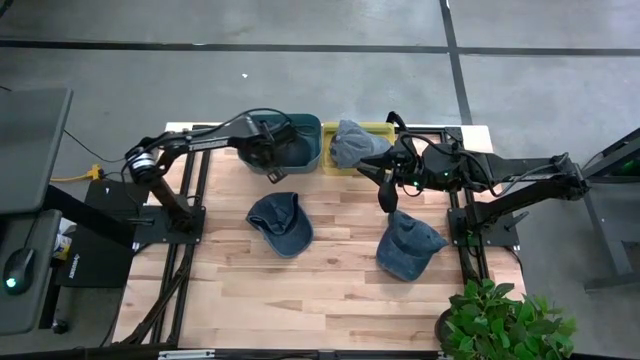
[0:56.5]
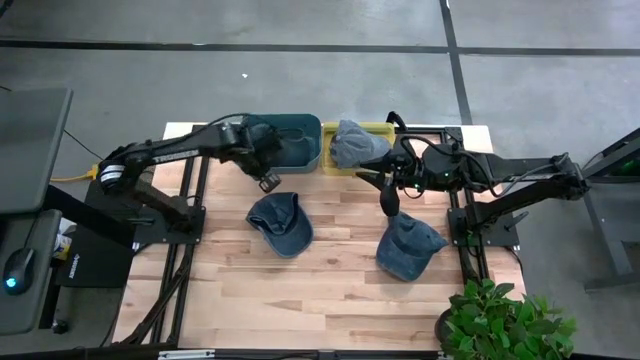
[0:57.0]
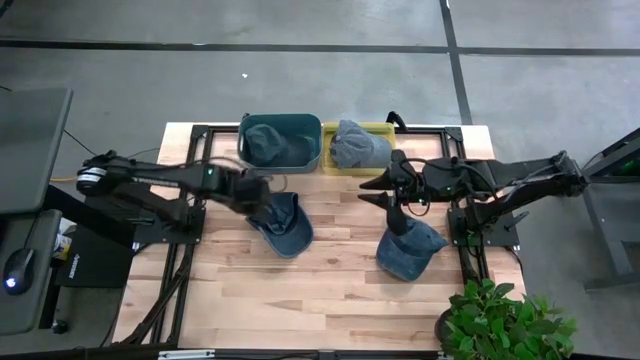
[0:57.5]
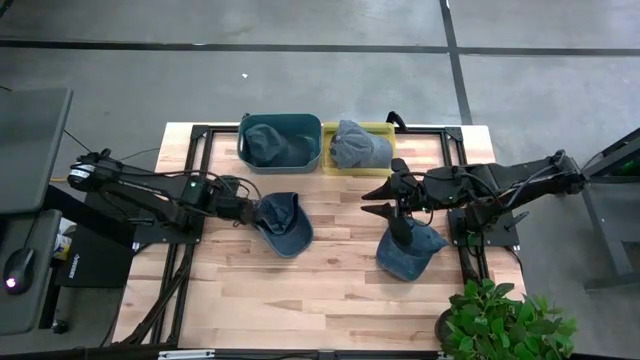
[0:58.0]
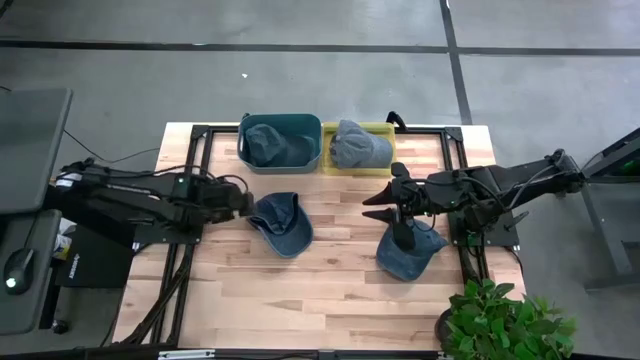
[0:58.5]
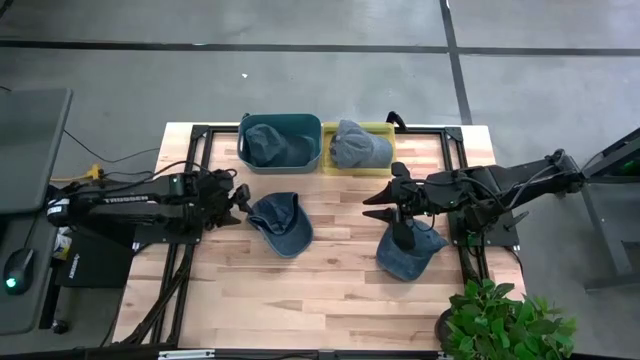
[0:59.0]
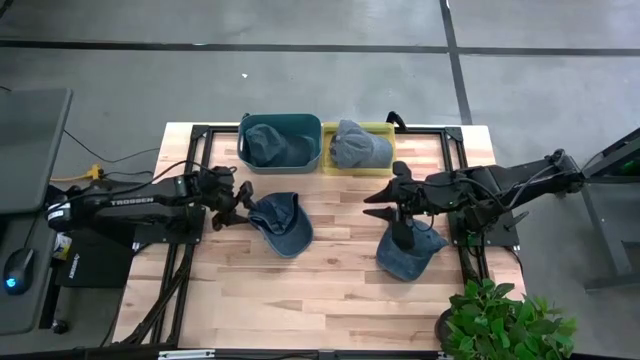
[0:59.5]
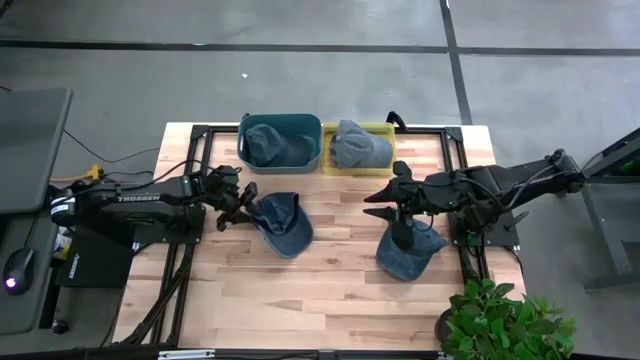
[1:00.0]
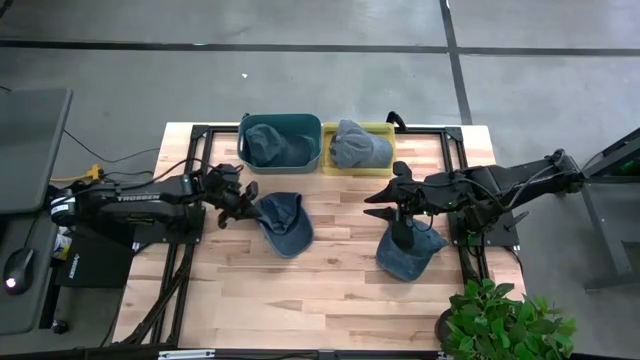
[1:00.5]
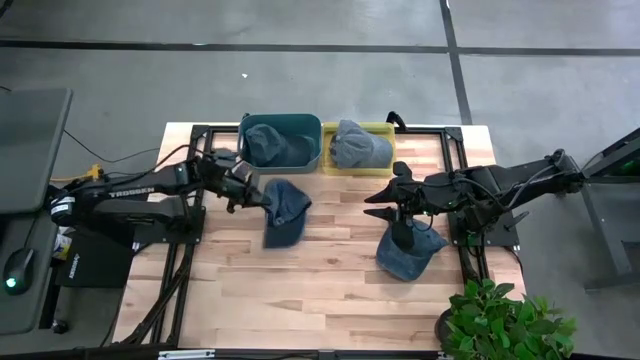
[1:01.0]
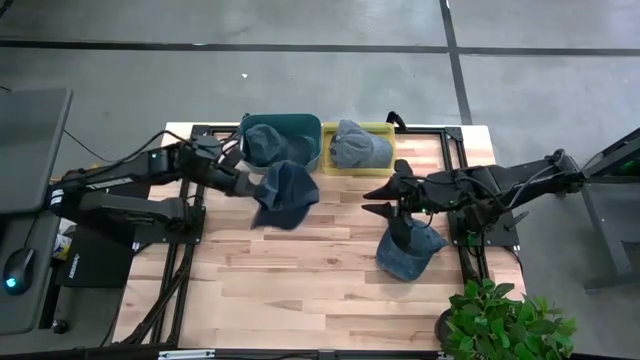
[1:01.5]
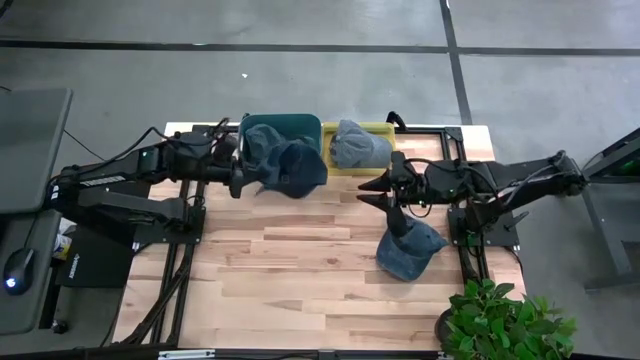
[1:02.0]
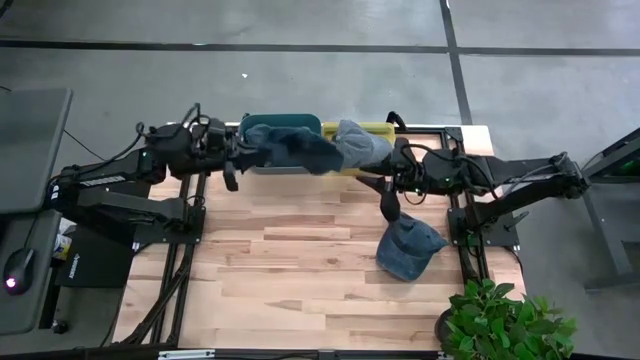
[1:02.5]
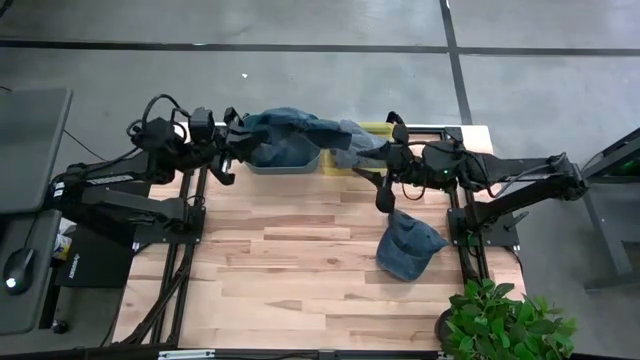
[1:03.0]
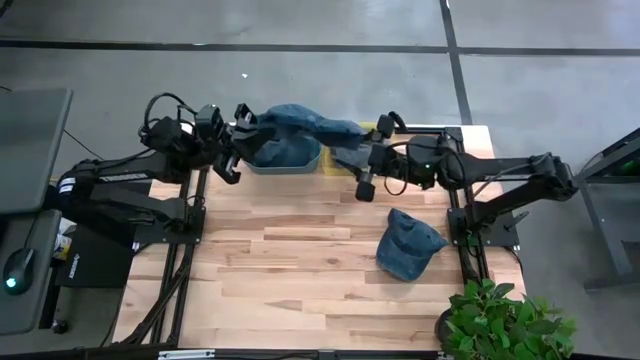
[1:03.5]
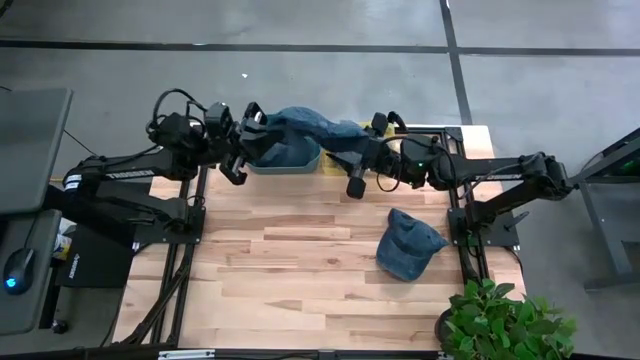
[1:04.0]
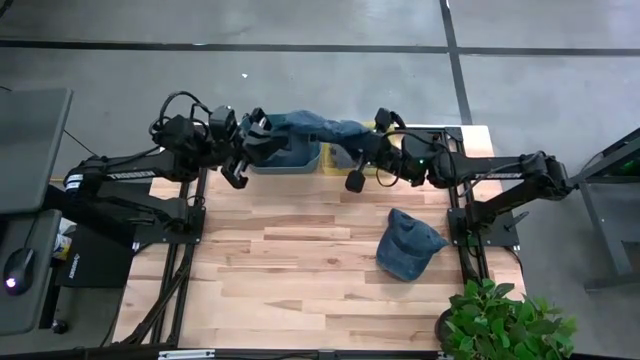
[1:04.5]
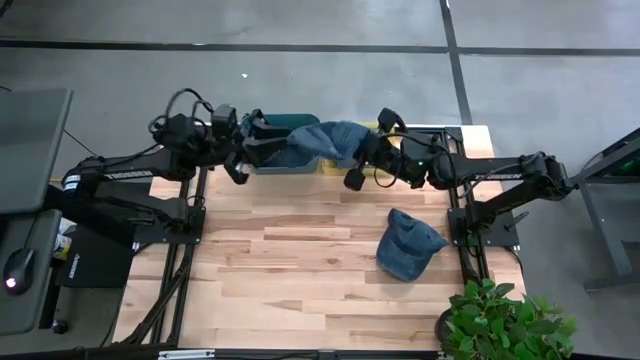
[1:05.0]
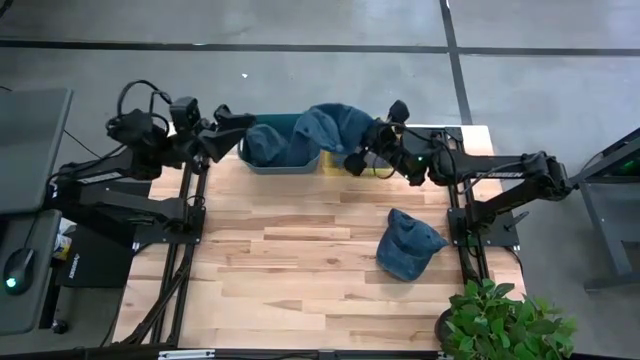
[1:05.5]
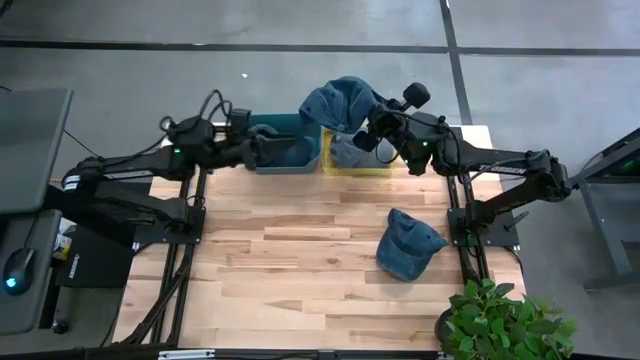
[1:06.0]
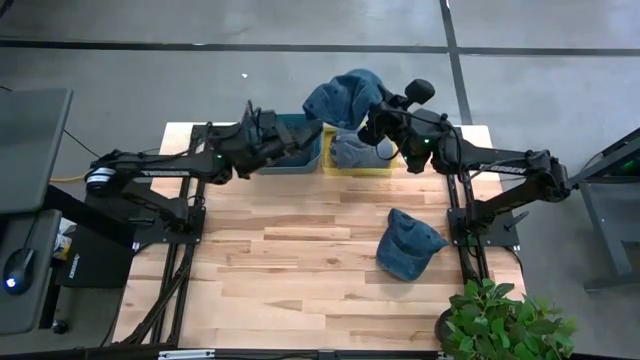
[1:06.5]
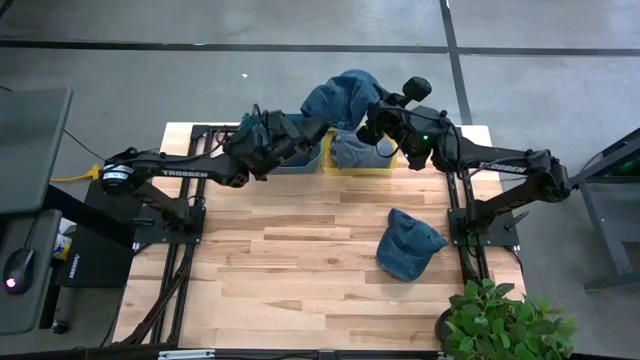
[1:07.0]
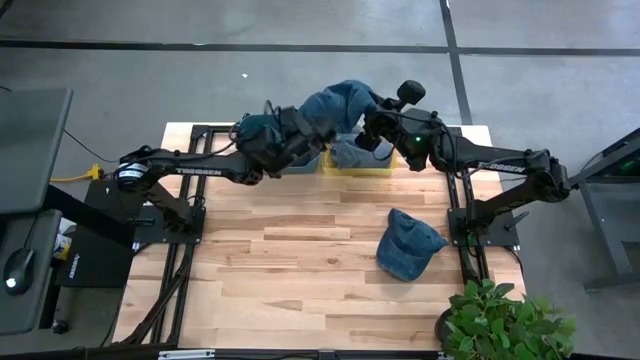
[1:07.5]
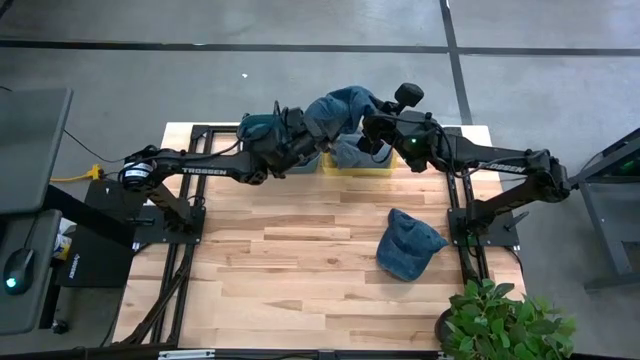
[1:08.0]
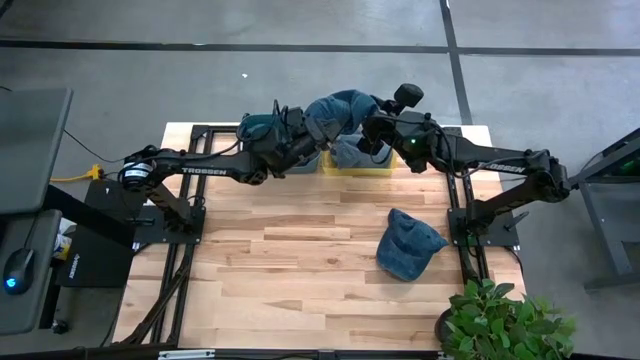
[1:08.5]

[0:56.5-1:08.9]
Task: Pick & Place hat
Put the left blue cap into the blue bin

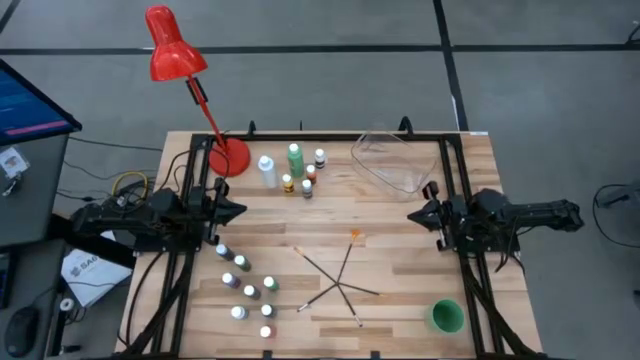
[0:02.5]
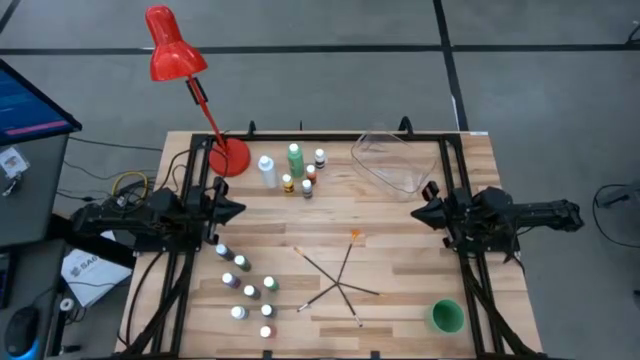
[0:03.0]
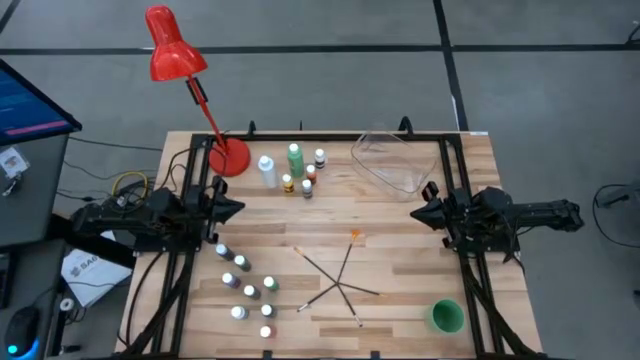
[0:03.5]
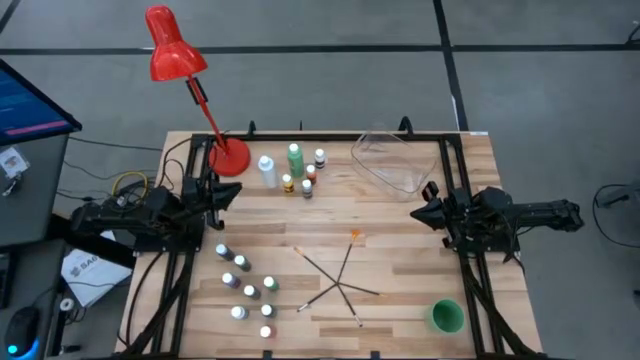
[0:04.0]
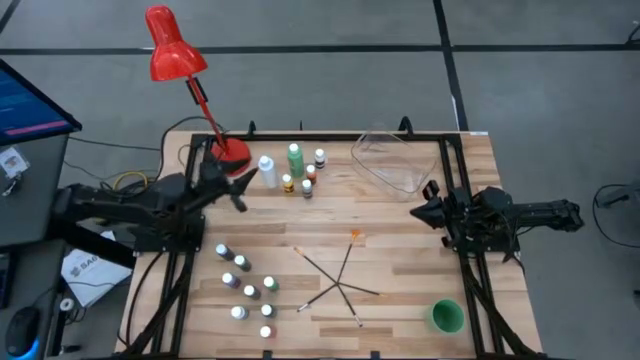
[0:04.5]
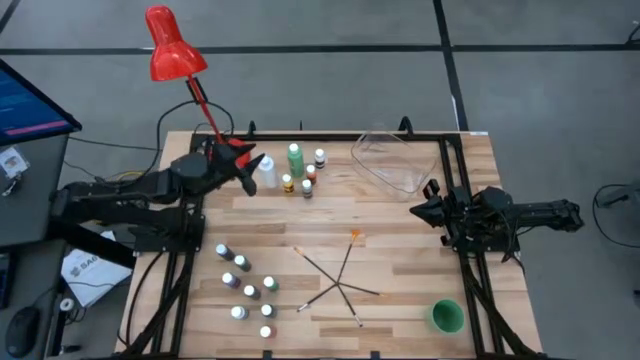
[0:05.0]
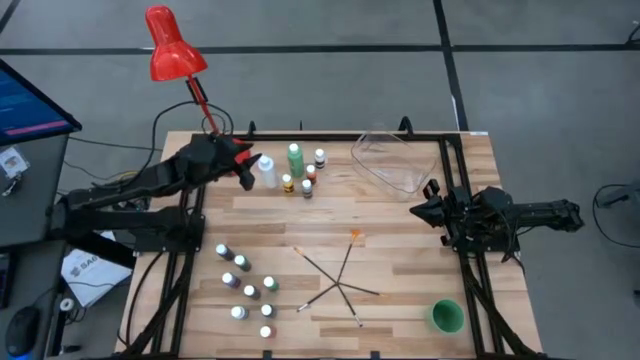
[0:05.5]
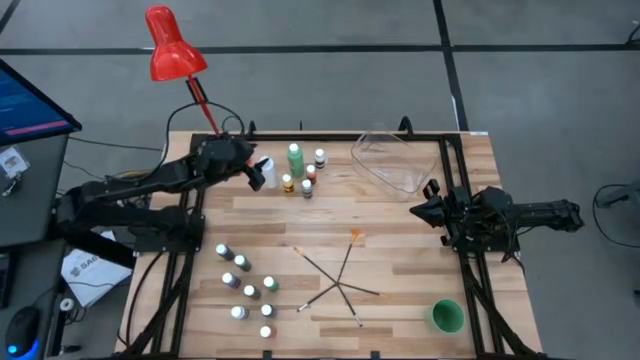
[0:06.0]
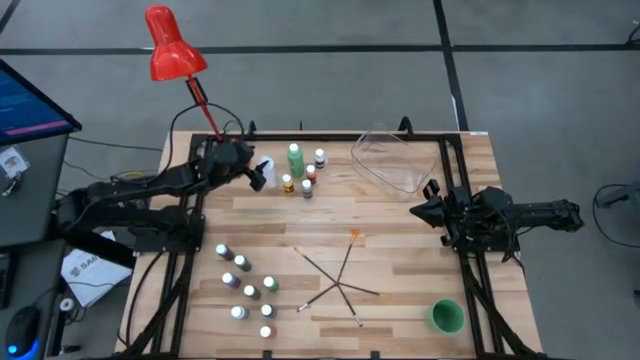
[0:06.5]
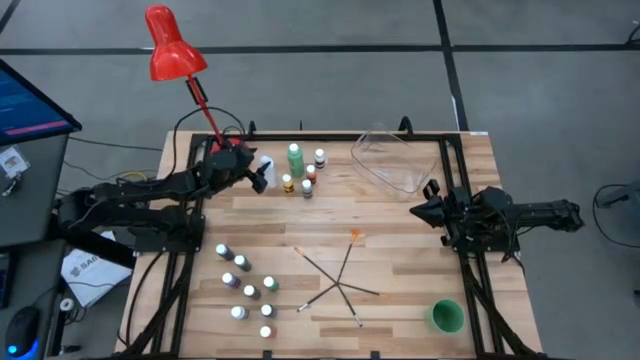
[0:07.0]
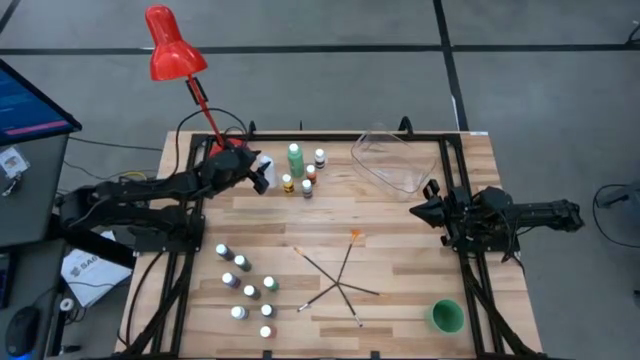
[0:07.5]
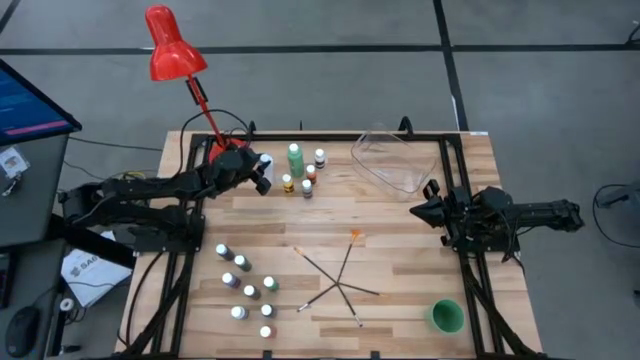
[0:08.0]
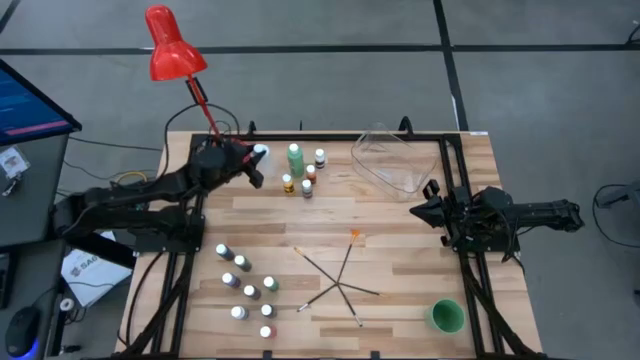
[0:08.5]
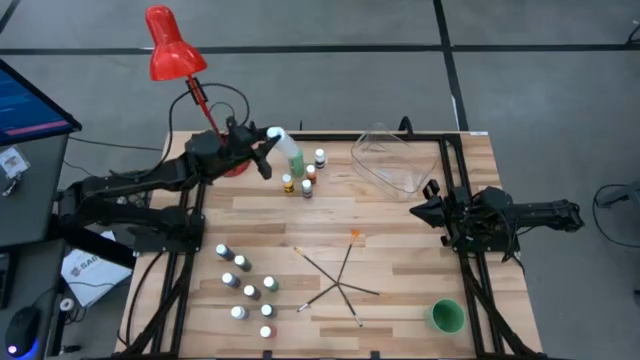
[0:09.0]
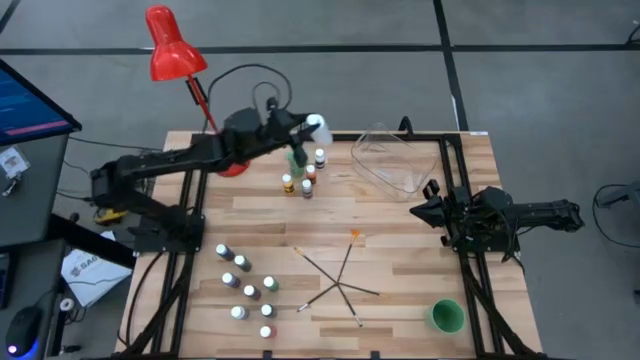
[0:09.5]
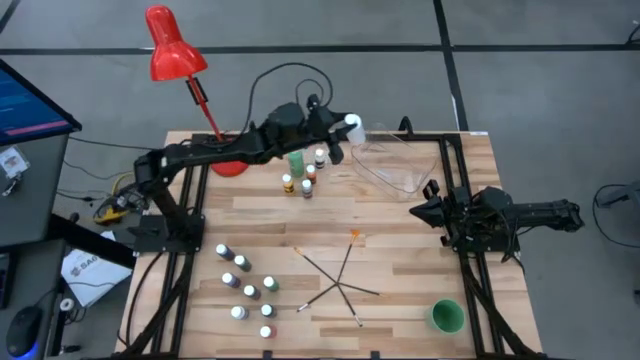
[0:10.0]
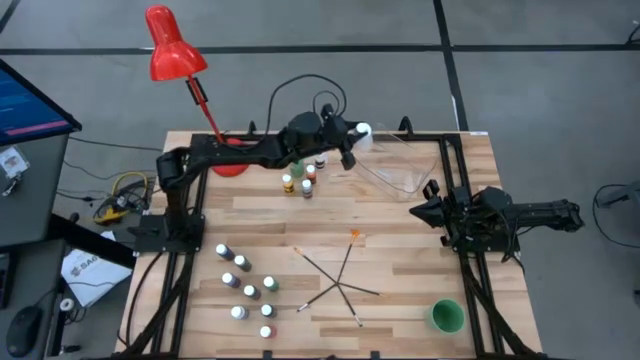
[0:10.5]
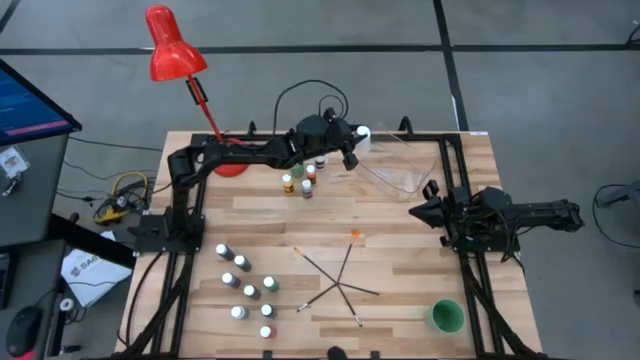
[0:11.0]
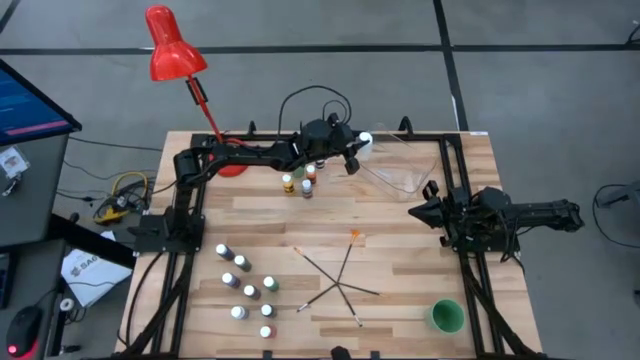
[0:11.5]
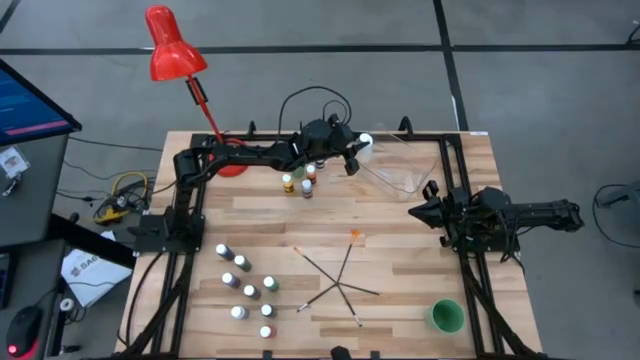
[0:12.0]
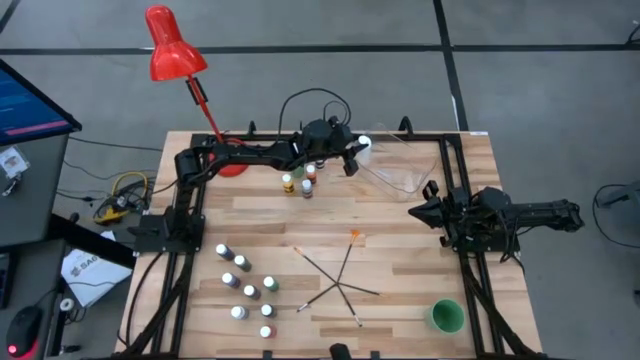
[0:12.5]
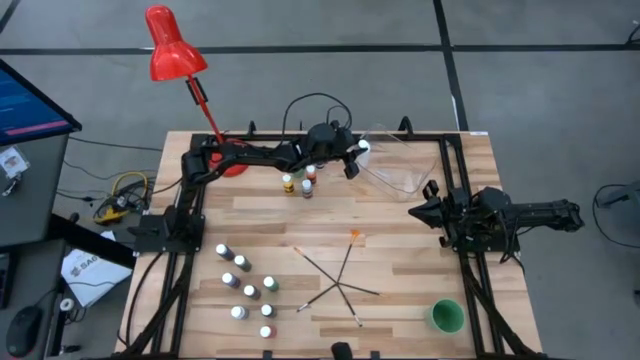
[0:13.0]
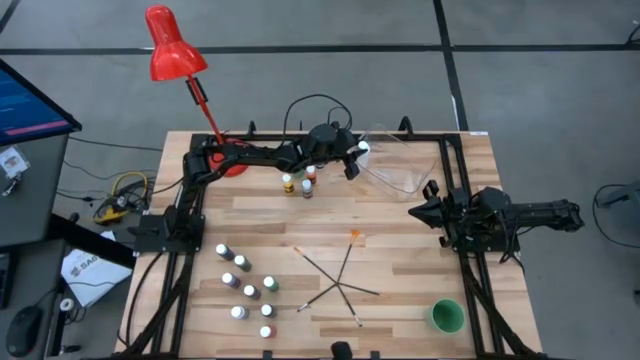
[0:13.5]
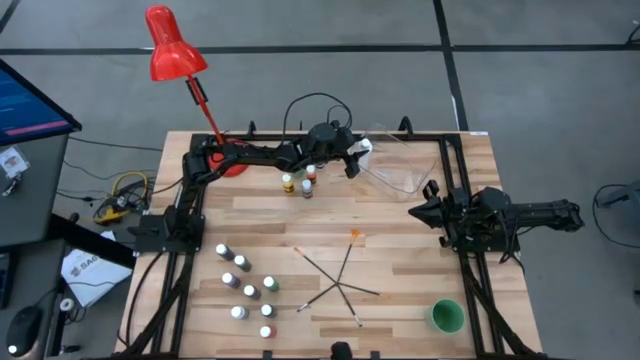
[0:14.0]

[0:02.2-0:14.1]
Task: Pick & Place Paint Supplies
Put the large white paint bottle into the transparent bin
